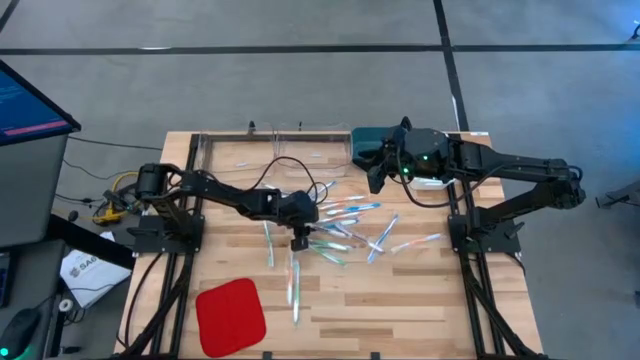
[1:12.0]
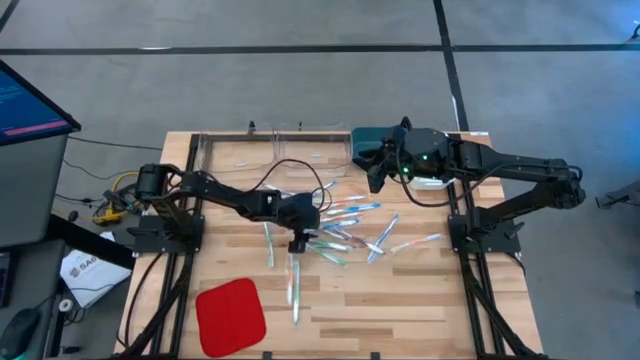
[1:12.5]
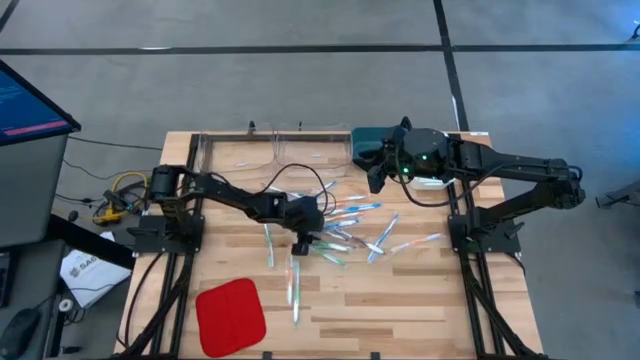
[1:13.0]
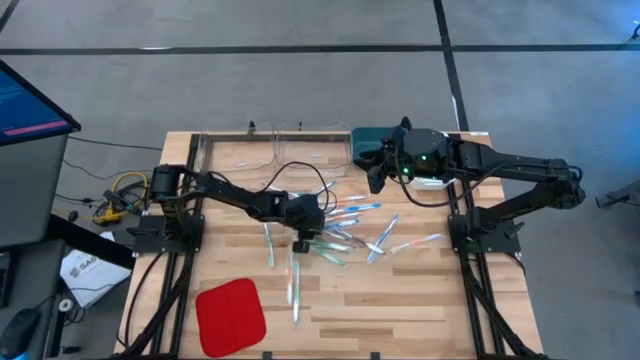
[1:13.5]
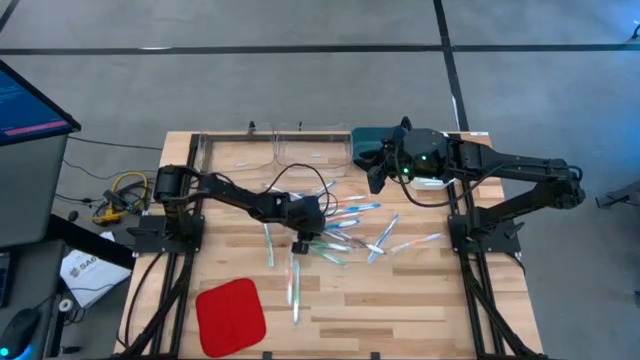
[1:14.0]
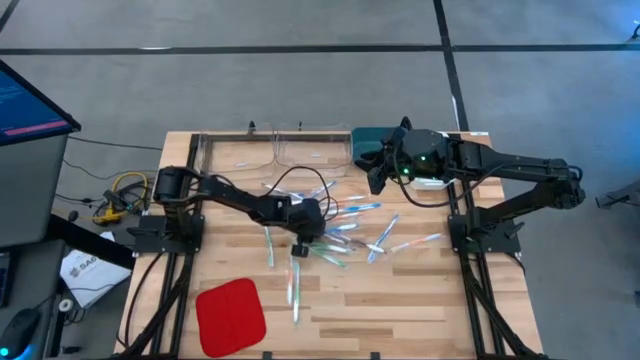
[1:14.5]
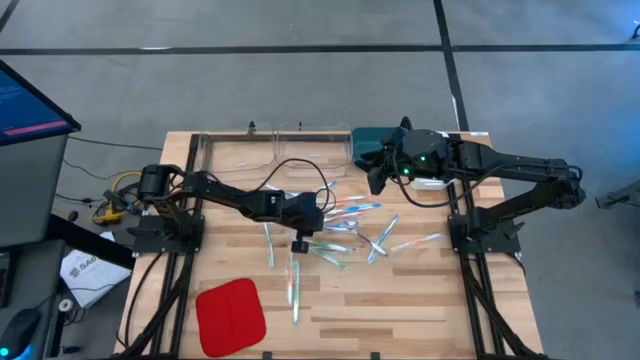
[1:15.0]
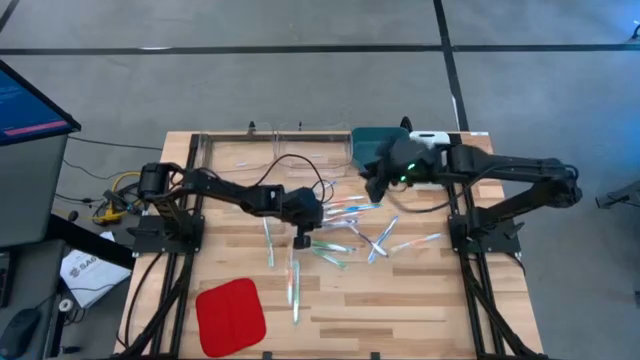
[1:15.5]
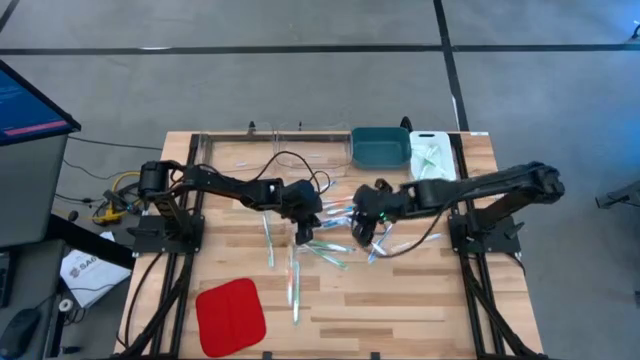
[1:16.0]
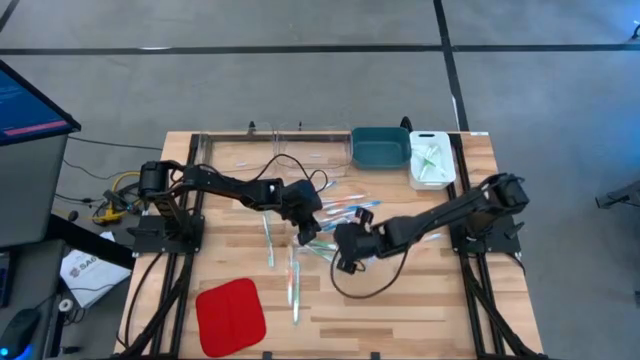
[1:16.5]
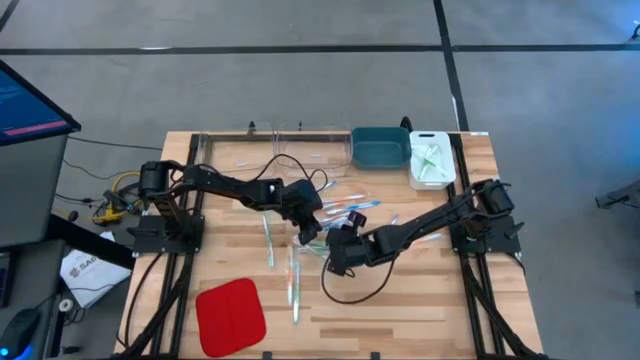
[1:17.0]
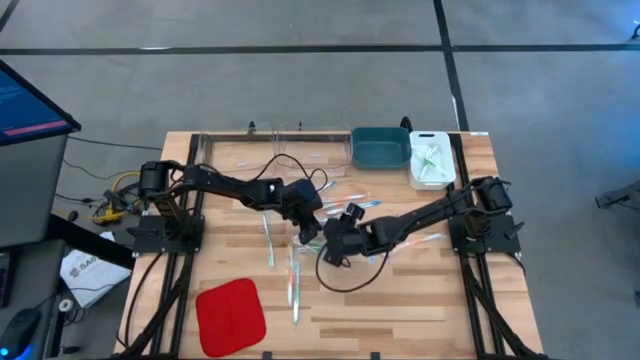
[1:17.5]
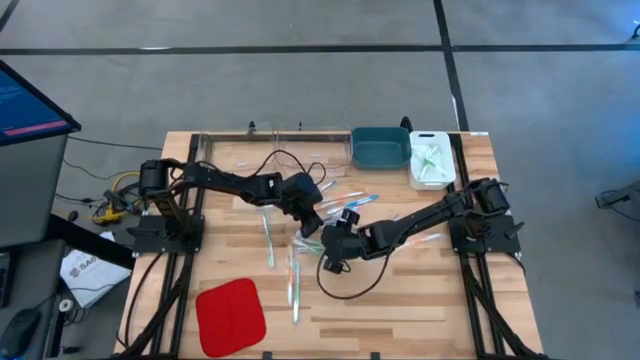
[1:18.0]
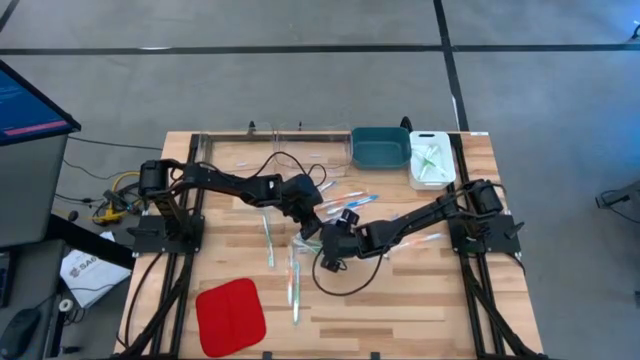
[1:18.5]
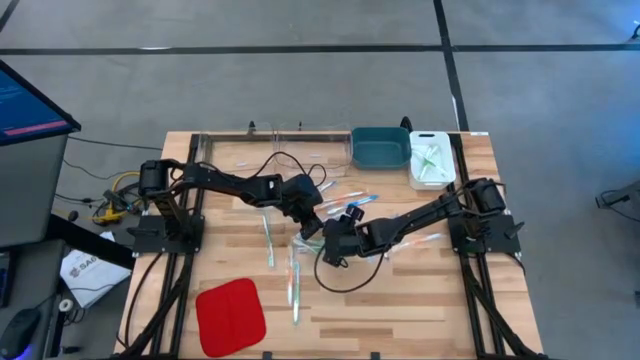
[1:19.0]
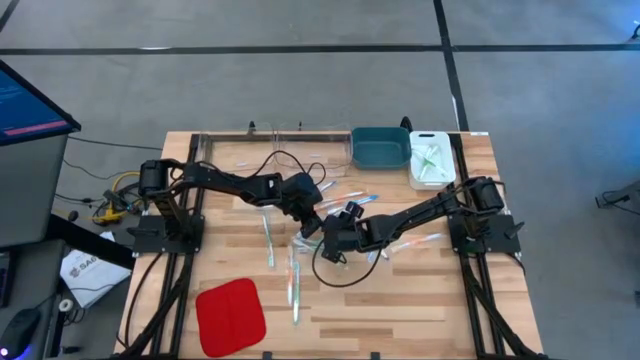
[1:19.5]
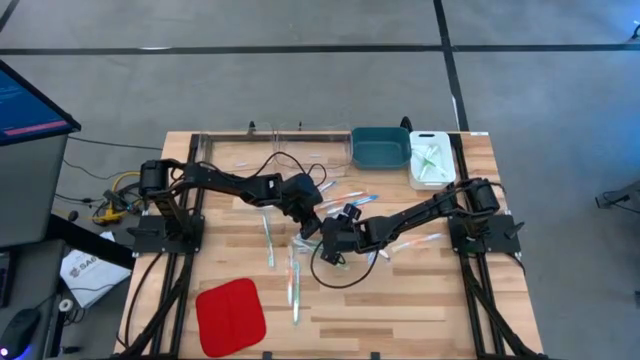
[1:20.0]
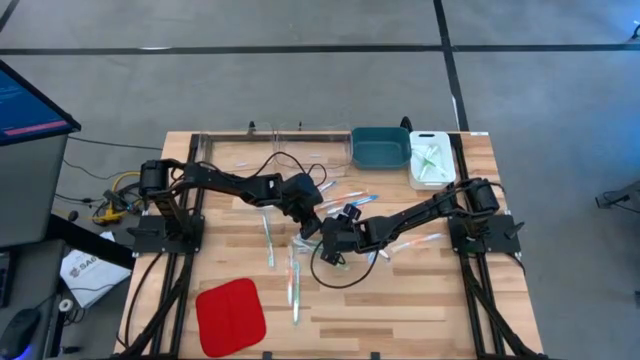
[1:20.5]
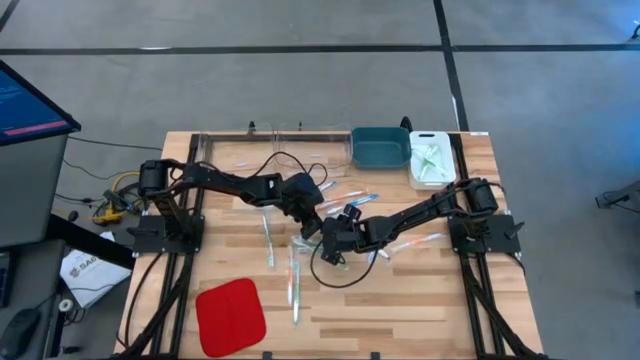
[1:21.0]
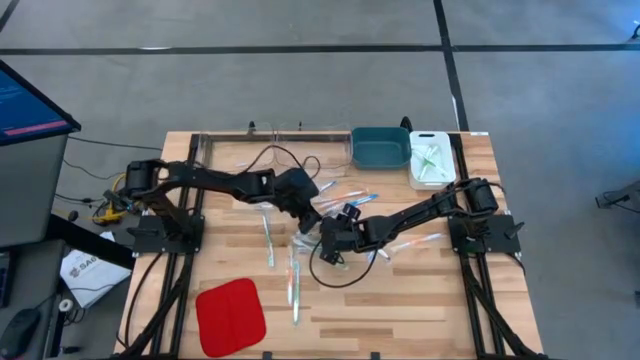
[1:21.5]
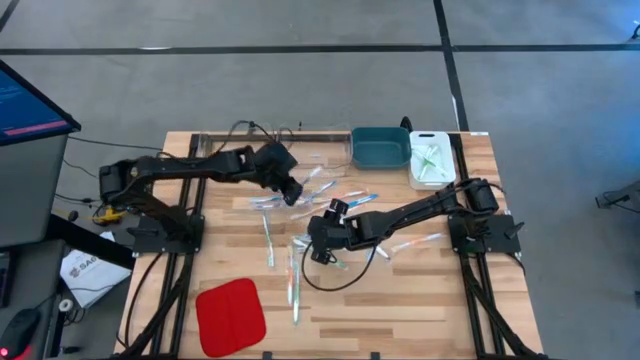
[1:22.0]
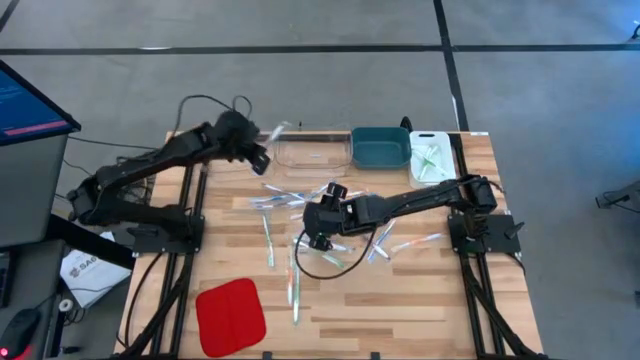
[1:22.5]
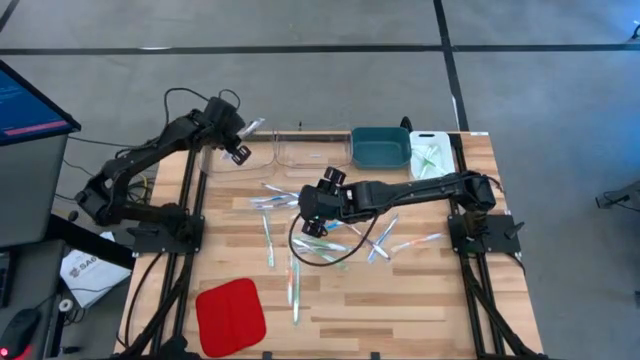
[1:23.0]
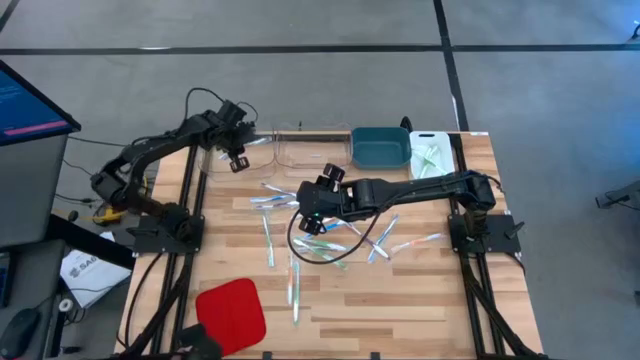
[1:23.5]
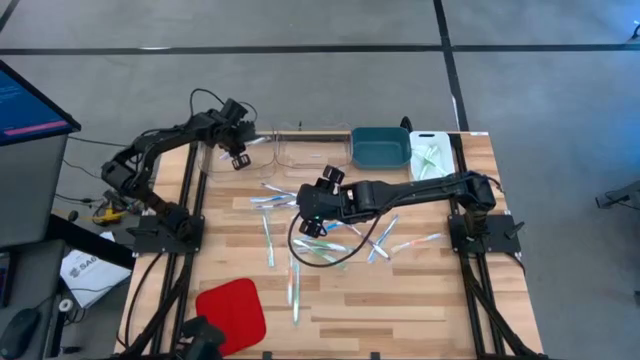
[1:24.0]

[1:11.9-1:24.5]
Task: Pick & Place Toothbrushes
Put the violet toothbrush into the left transparent bin

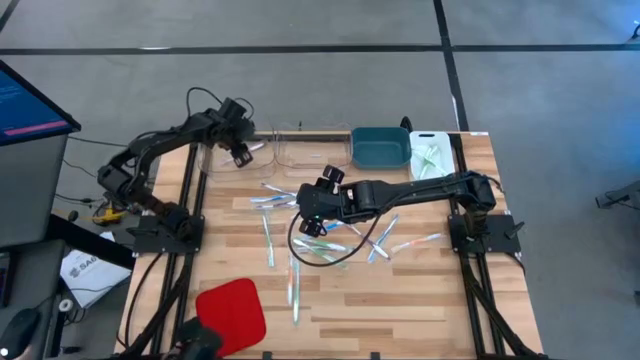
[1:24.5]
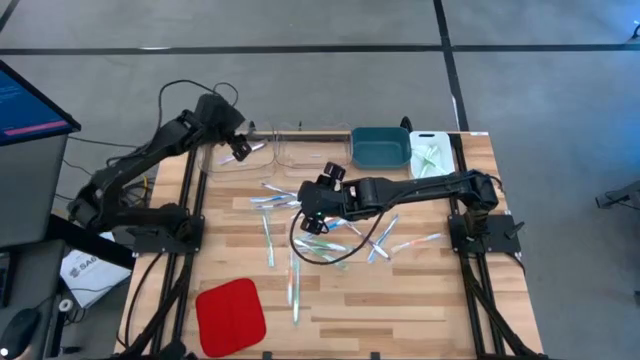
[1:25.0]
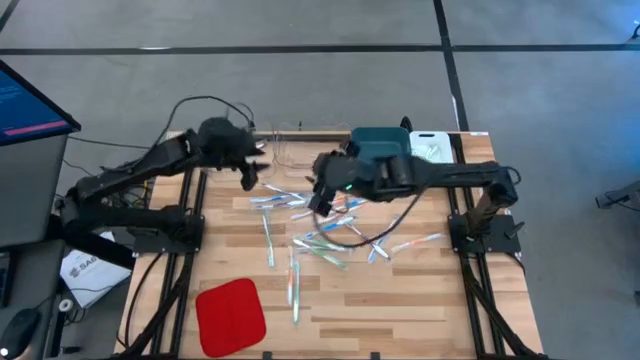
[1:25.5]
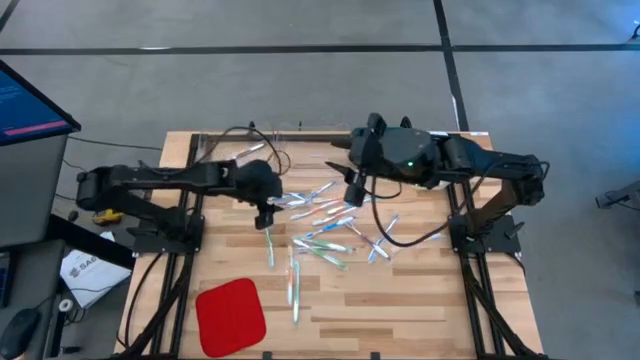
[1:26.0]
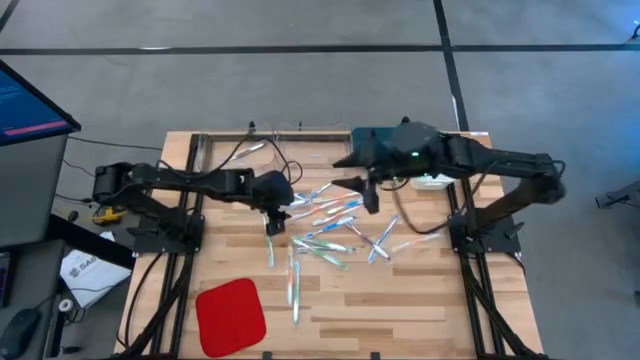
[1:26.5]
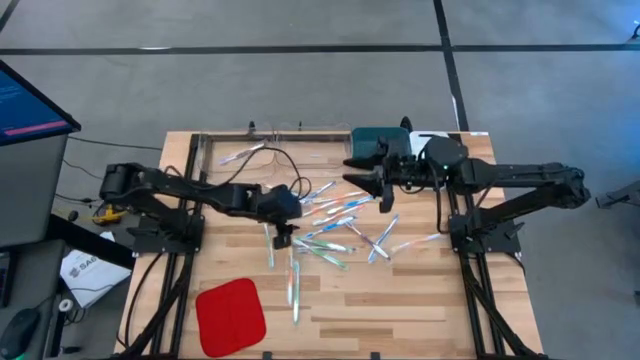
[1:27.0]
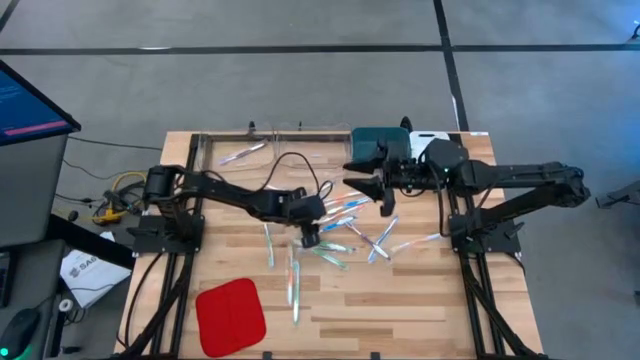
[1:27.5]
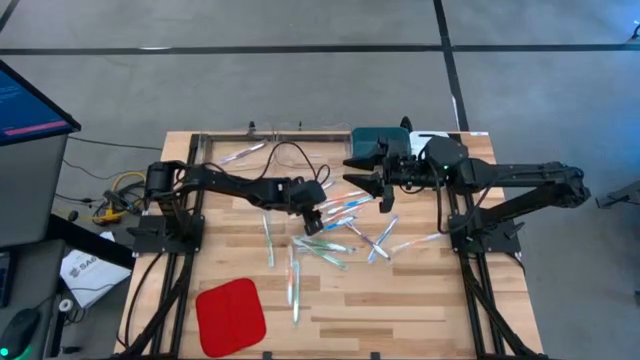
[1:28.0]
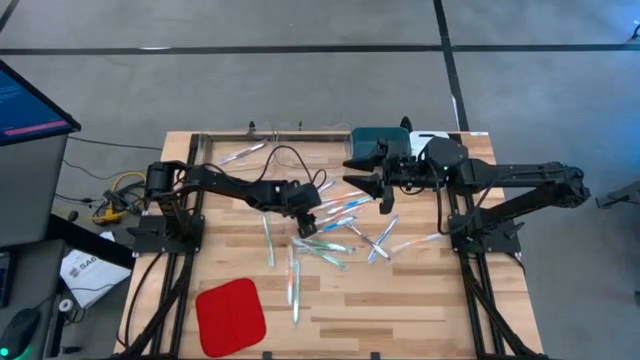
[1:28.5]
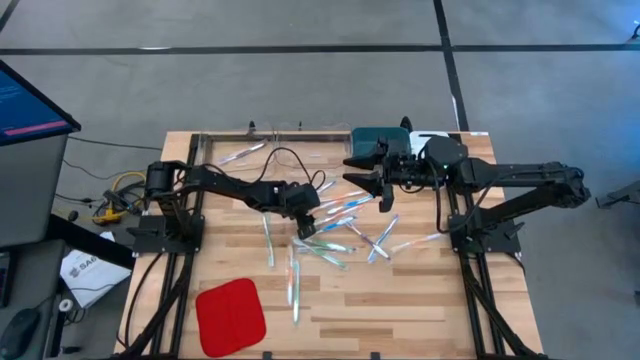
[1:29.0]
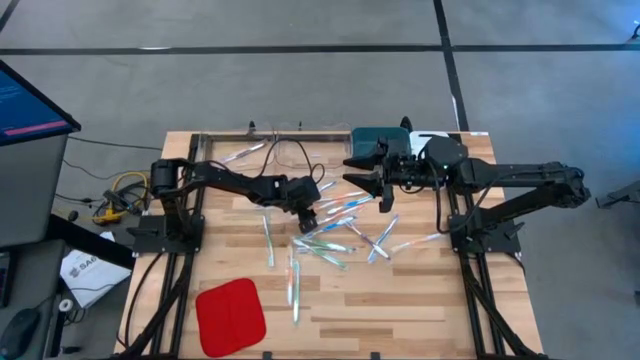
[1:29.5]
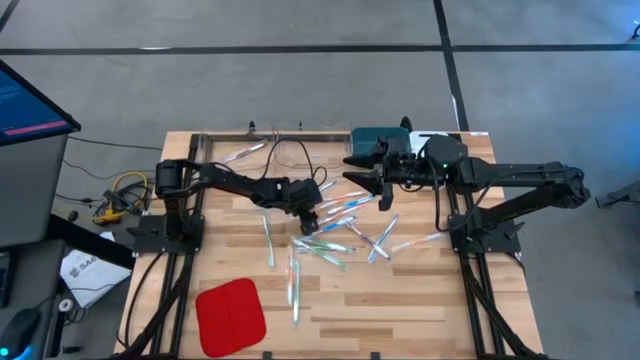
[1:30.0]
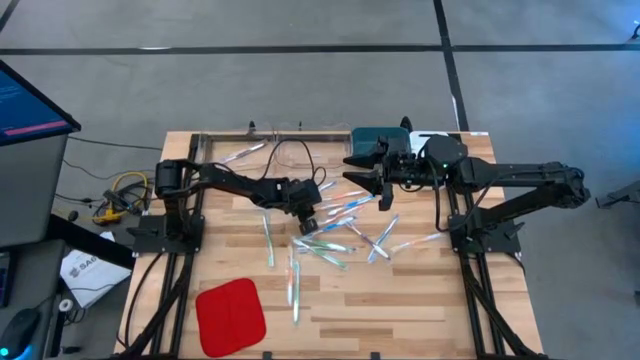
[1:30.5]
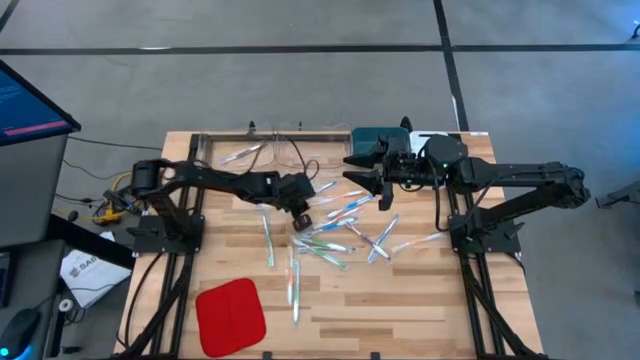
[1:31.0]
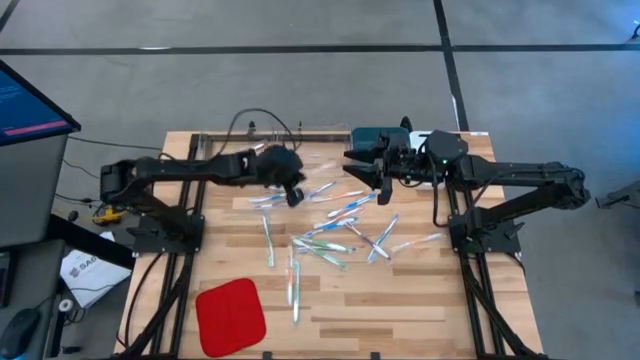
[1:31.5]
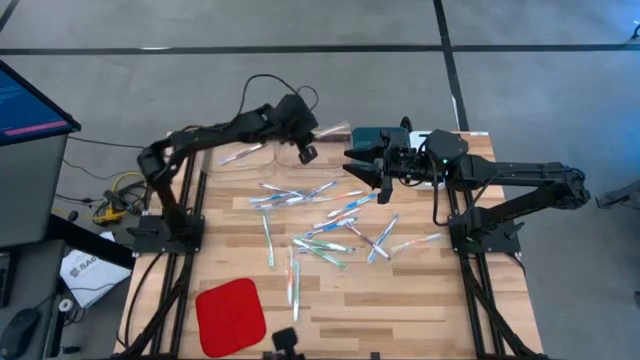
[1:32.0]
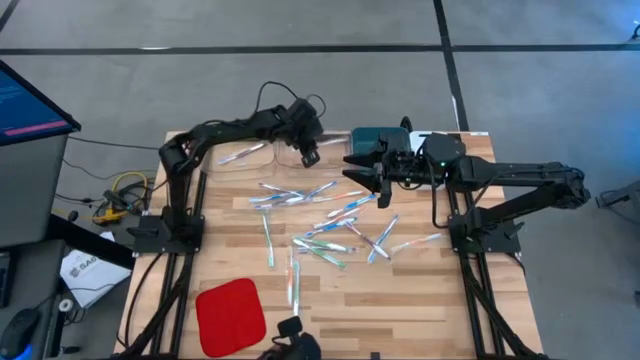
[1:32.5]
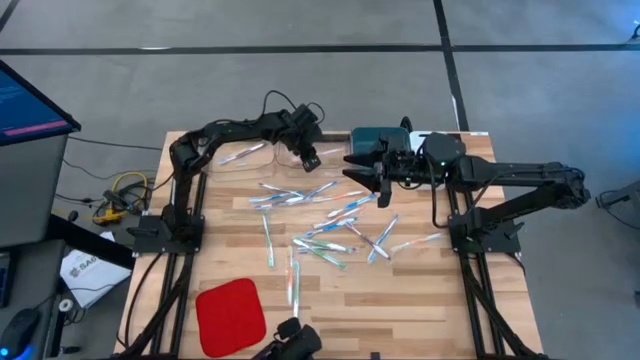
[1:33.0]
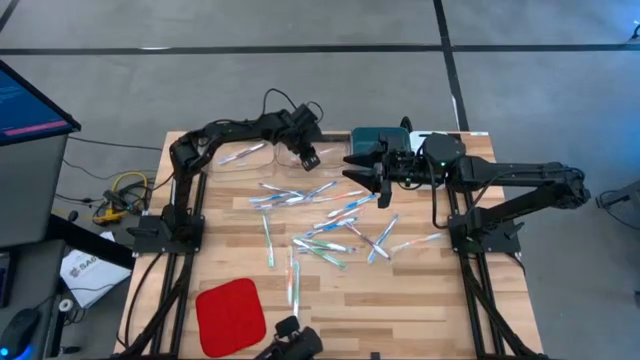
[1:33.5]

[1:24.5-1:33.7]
Put the orange toothbrush into the right transparent bin
